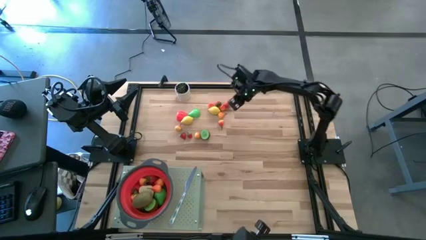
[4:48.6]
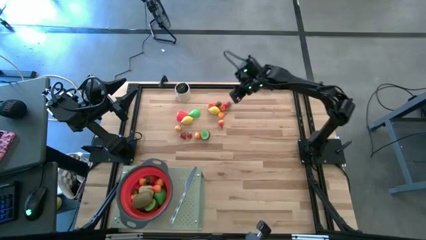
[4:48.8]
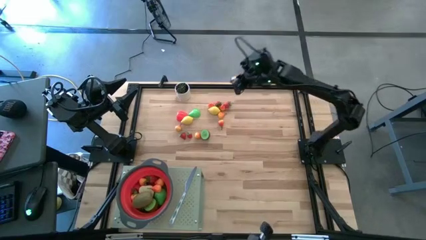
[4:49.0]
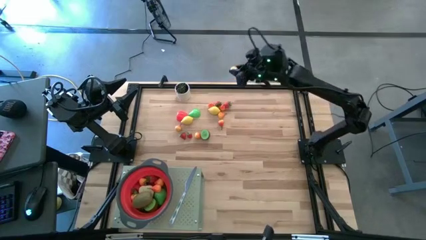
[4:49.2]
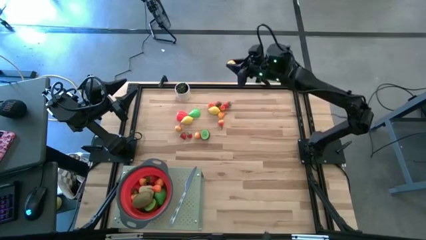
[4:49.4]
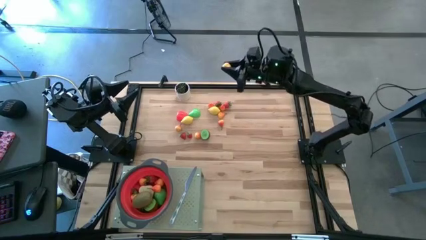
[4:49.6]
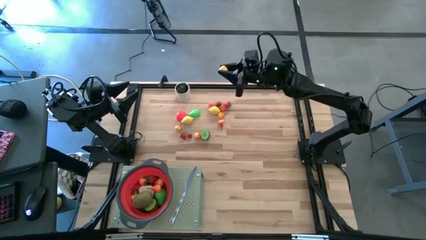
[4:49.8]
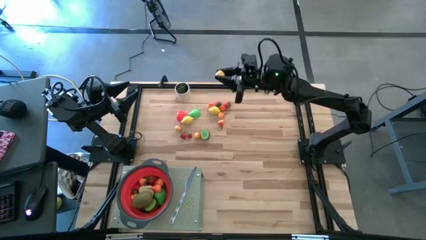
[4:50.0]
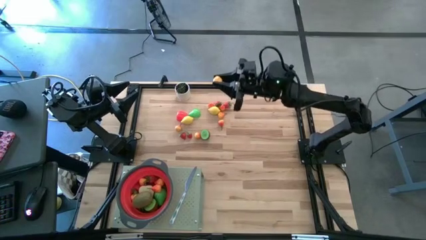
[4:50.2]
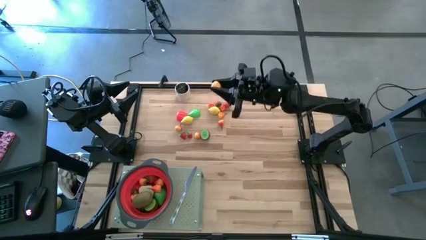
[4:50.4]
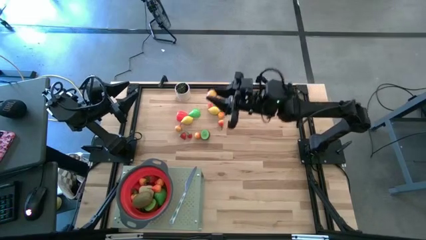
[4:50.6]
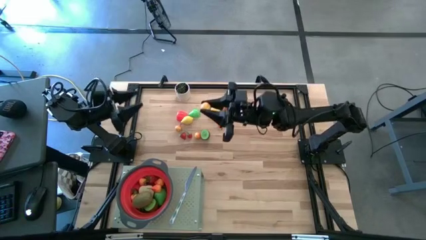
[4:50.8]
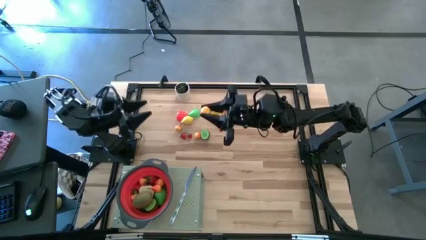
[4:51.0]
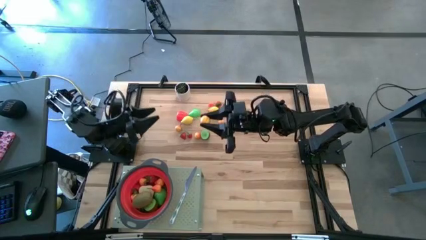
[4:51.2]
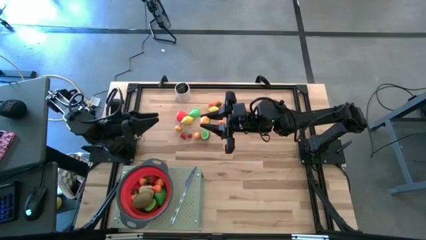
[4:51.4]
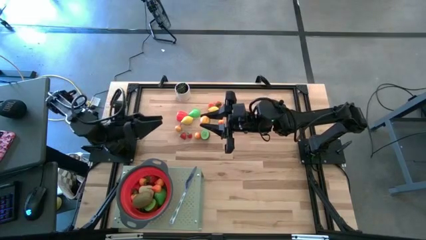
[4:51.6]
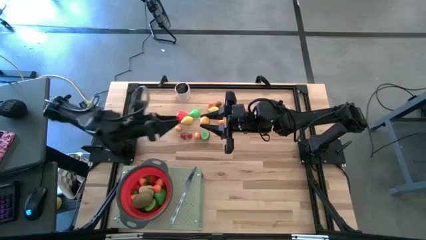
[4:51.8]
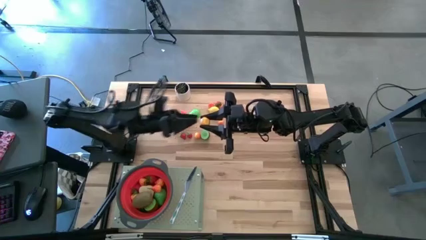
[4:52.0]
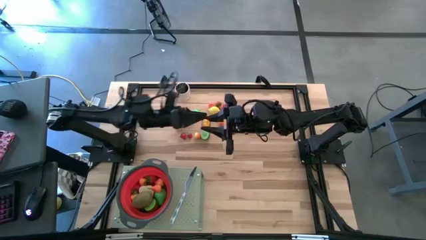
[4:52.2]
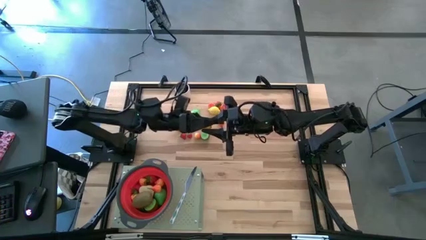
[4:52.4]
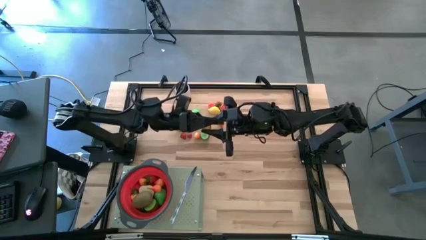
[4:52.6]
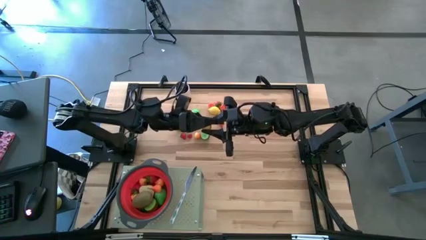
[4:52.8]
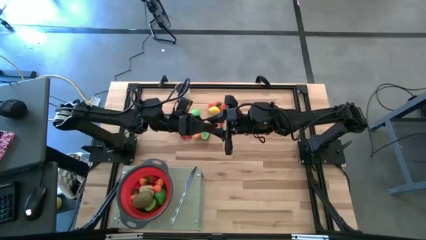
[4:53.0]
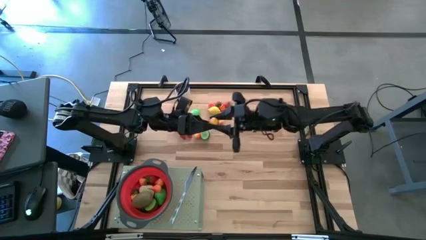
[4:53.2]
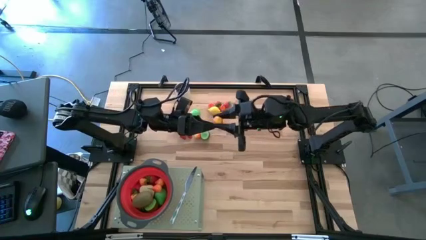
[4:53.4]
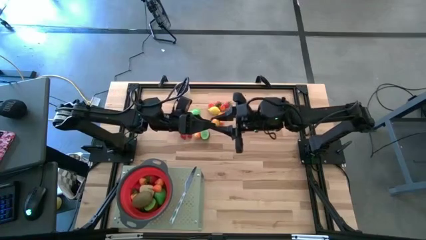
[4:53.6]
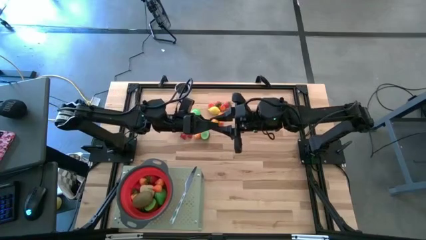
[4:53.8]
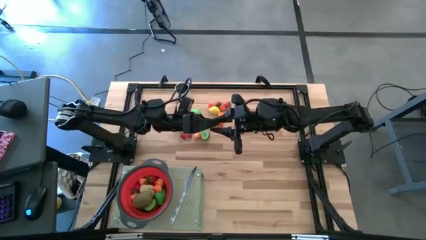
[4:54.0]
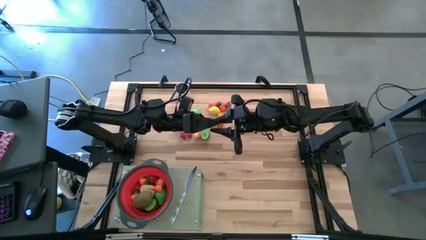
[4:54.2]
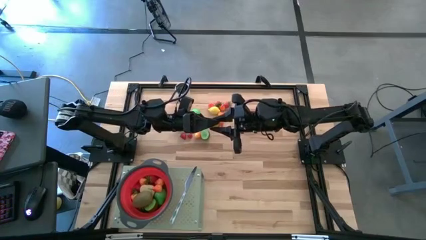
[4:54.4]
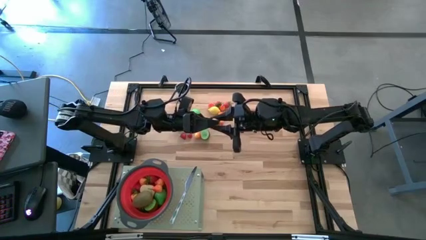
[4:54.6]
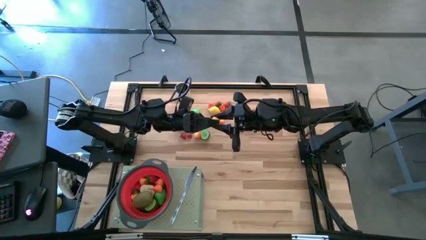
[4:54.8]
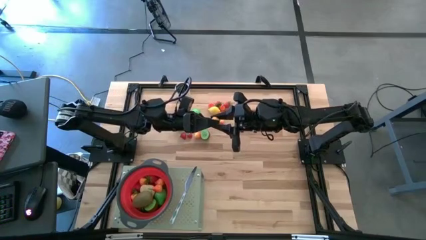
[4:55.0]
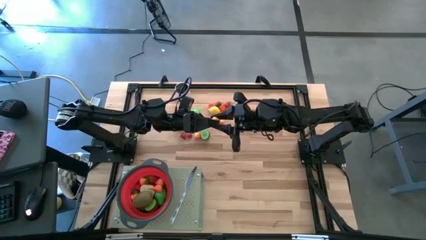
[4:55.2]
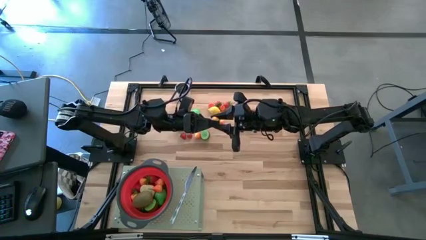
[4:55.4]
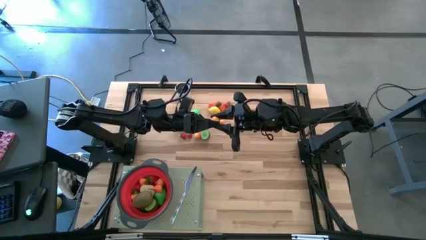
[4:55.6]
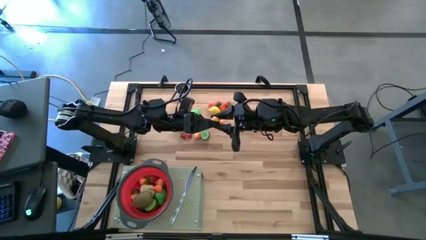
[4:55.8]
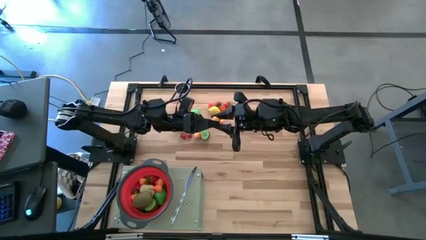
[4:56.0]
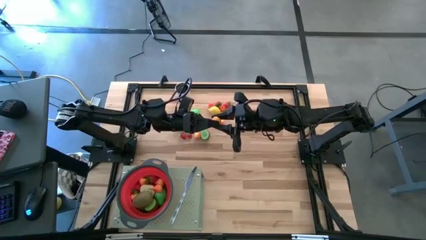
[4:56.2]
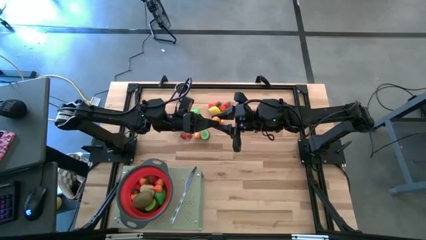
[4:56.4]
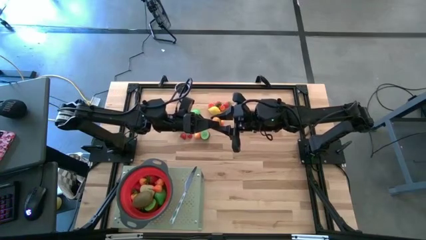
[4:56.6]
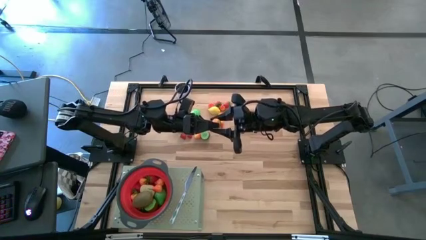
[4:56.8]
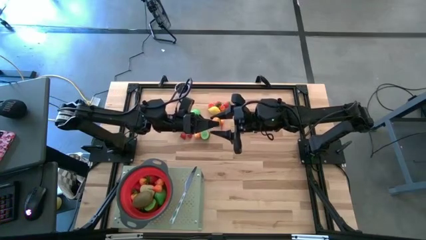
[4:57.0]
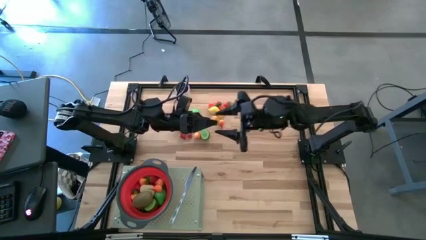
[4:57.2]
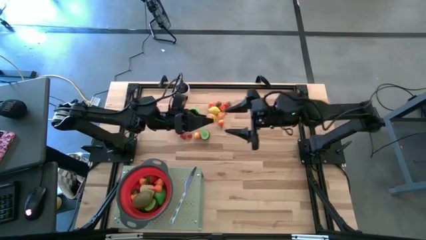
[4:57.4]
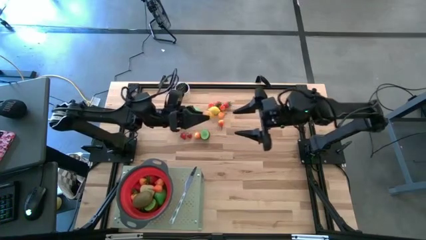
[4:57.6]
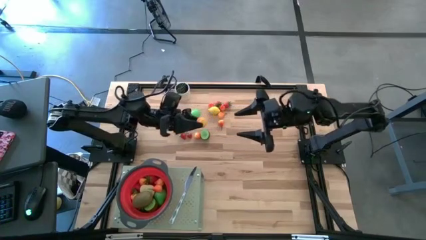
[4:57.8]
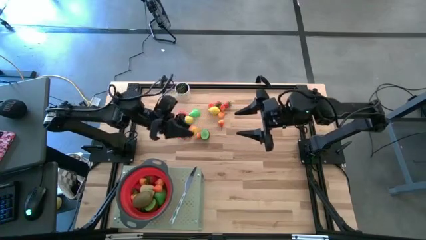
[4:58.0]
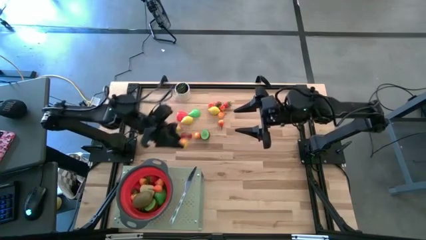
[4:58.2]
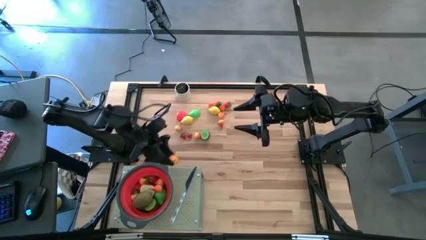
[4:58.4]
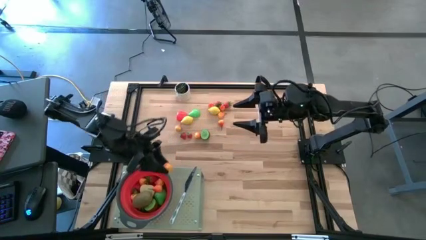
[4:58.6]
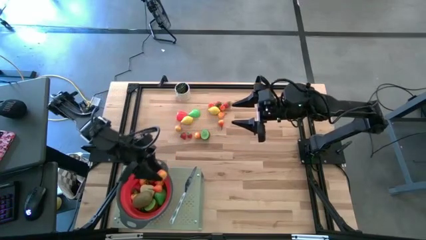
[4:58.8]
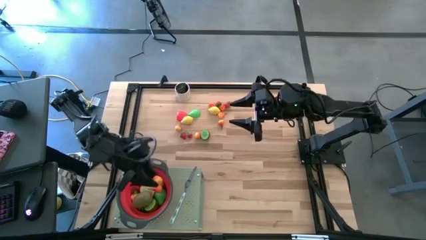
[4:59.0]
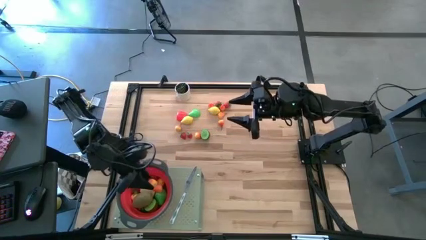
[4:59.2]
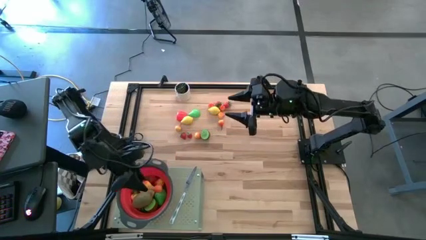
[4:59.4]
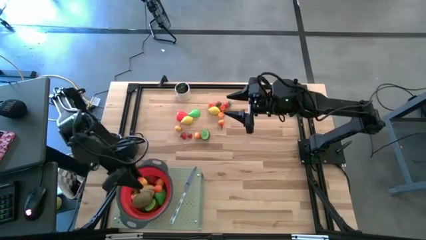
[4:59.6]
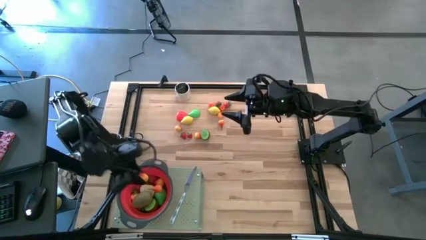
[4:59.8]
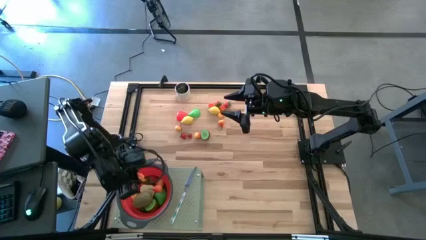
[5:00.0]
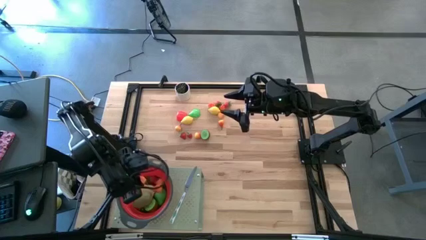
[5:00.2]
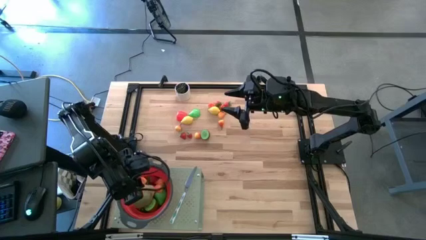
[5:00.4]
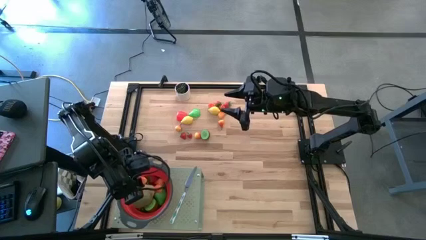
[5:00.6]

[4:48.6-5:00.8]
Task: Pick & Place Fruit
Put the pear into the red strainer bowl on the shelf

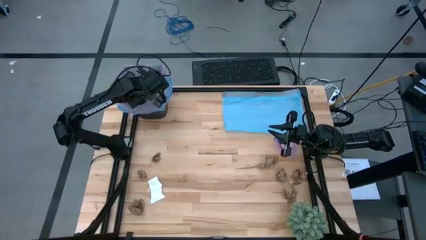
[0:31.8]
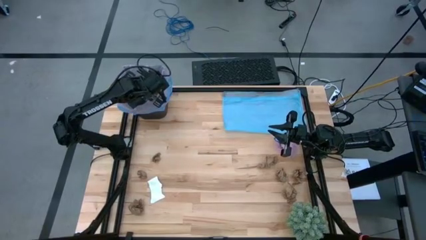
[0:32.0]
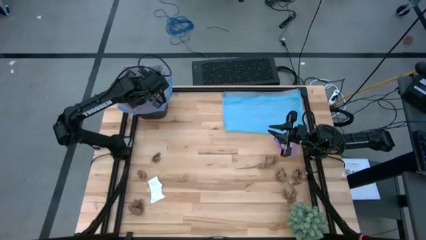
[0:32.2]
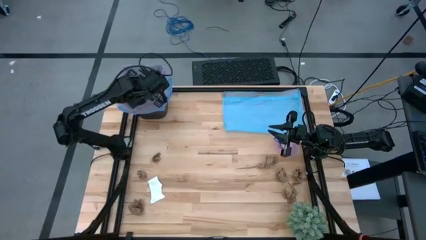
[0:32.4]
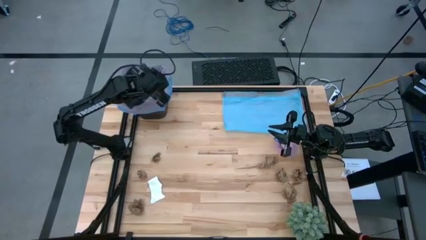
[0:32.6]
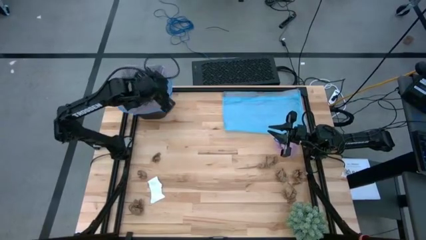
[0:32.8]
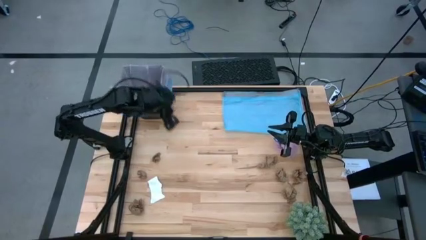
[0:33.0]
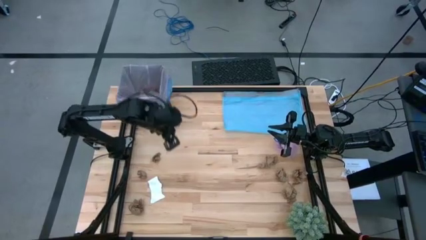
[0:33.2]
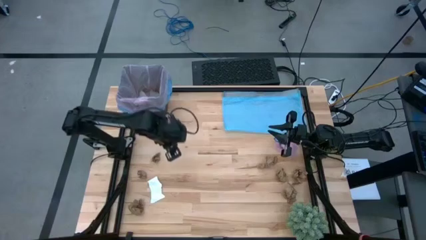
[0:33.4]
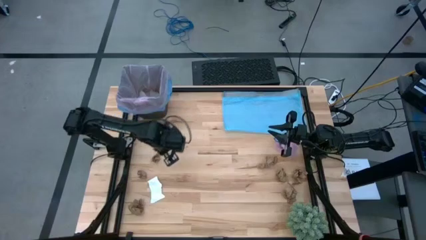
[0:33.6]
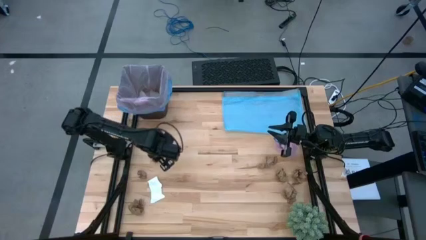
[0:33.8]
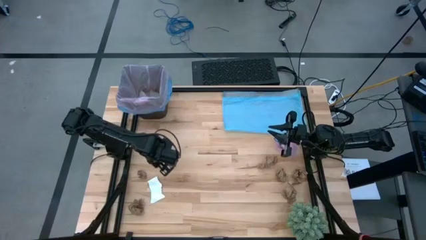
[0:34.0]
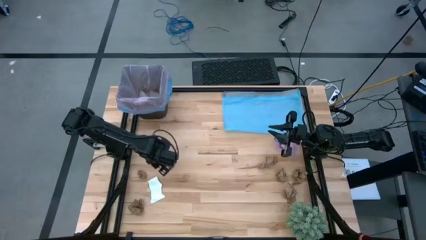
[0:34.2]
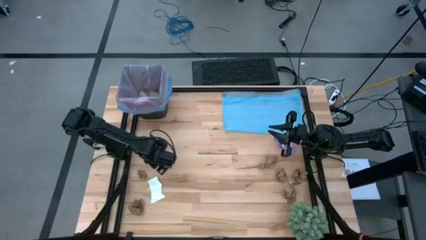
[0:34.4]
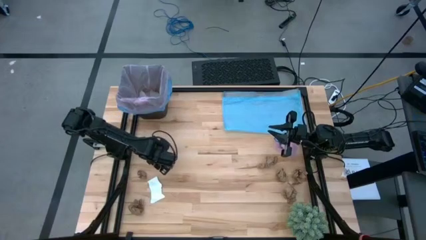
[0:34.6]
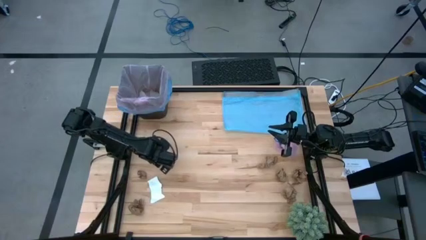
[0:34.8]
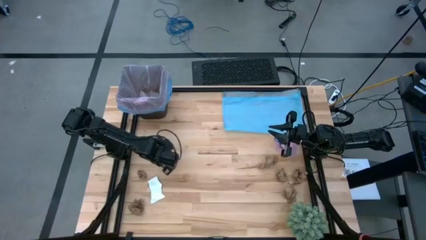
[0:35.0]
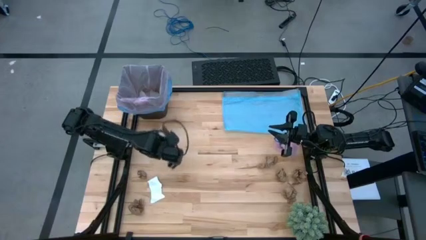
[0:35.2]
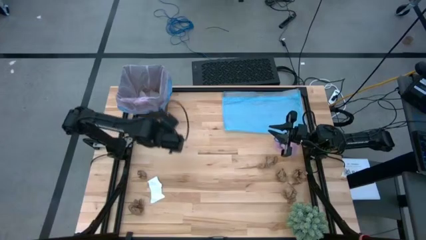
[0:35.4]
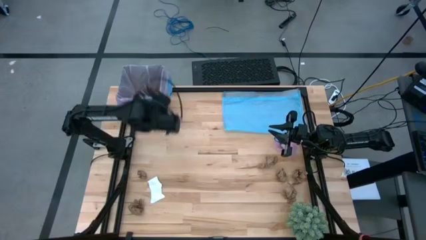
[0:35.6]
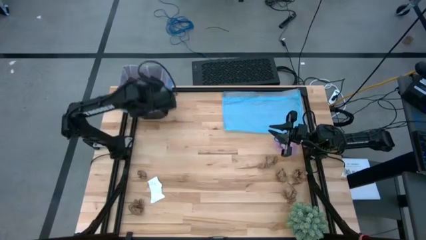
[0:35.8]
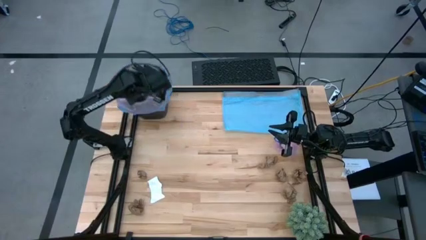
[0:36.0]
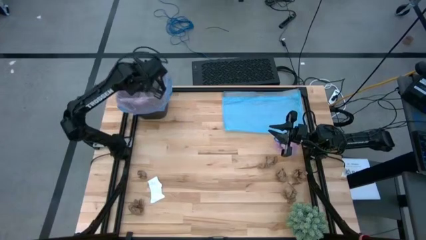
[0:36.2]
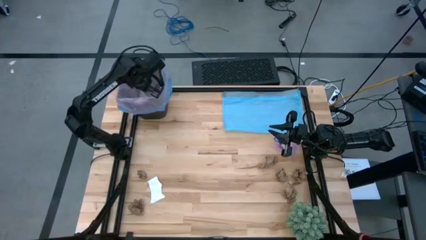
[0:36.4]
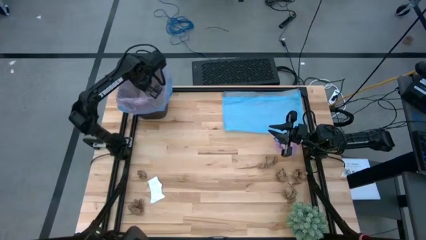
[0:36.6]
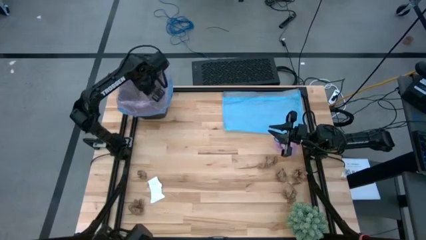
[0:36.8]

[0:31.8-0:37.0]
Task: place trash/remove bag and relplace
Put the brown napkin into the trash bin
